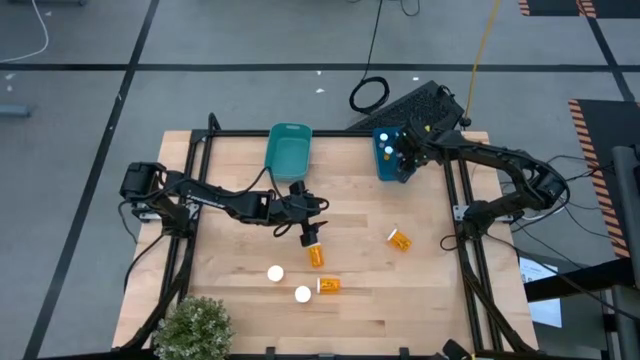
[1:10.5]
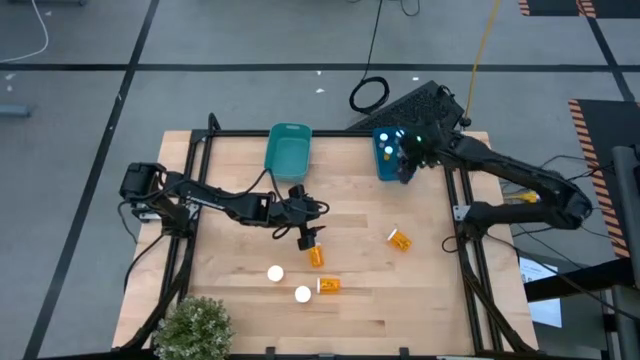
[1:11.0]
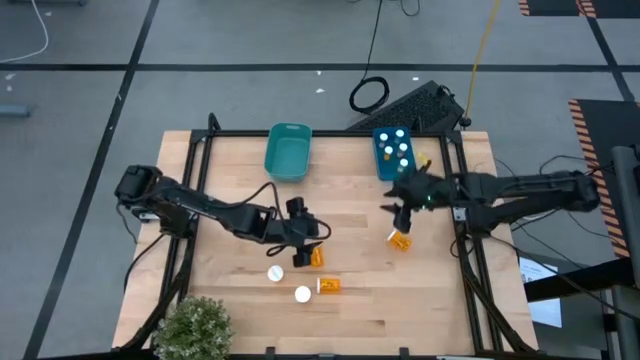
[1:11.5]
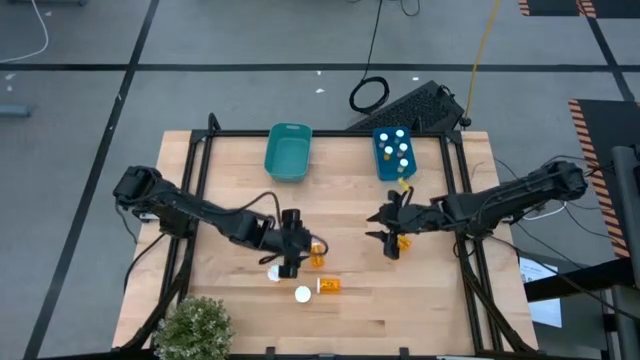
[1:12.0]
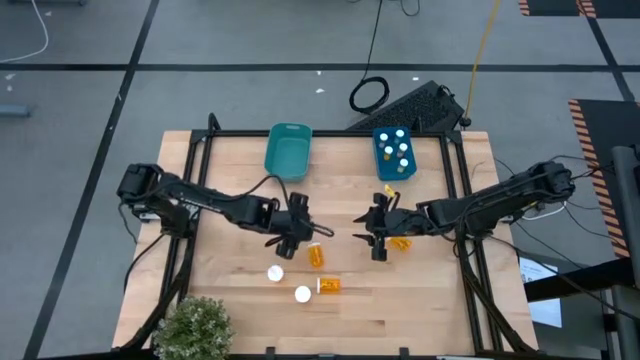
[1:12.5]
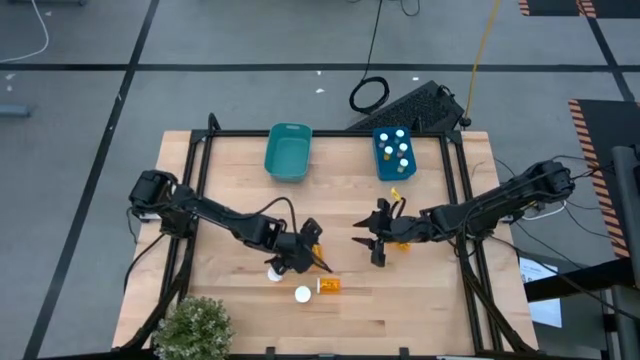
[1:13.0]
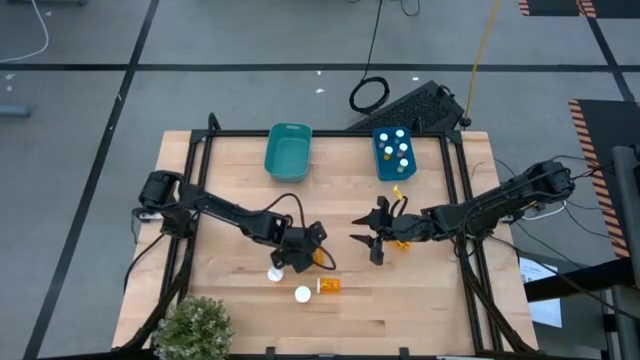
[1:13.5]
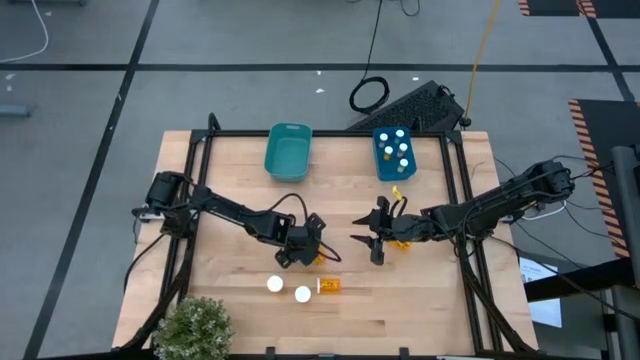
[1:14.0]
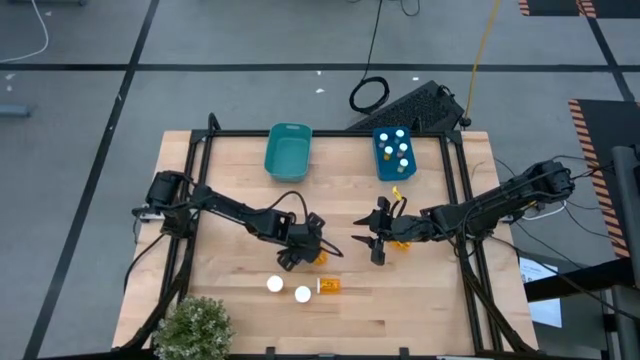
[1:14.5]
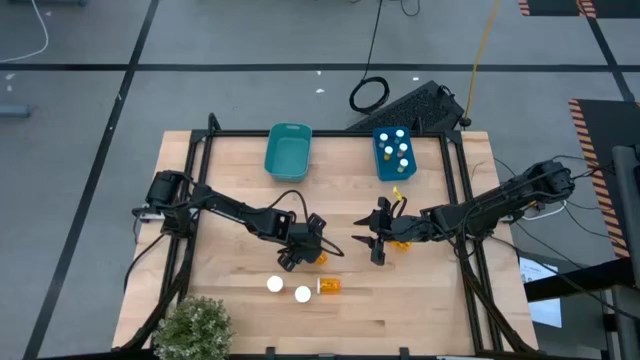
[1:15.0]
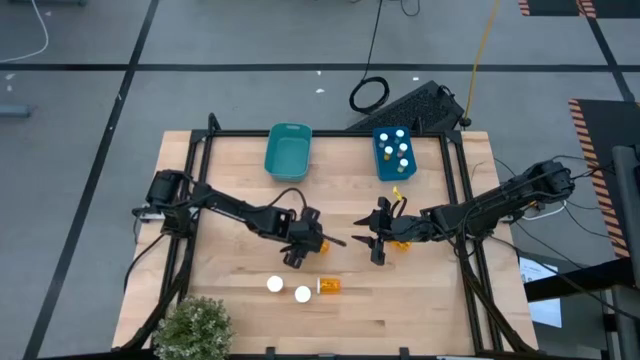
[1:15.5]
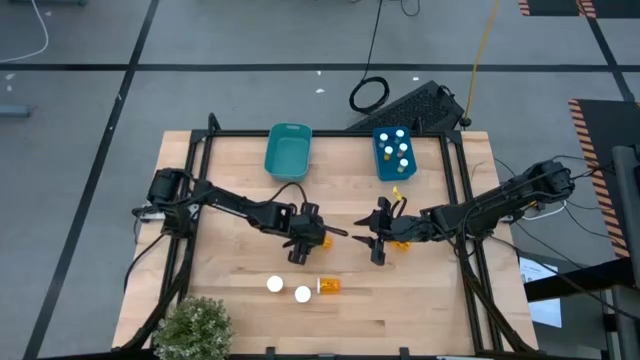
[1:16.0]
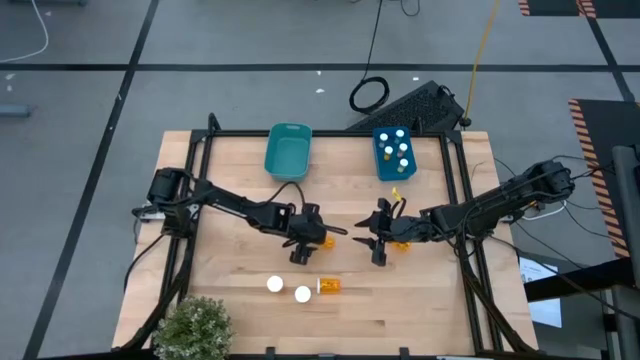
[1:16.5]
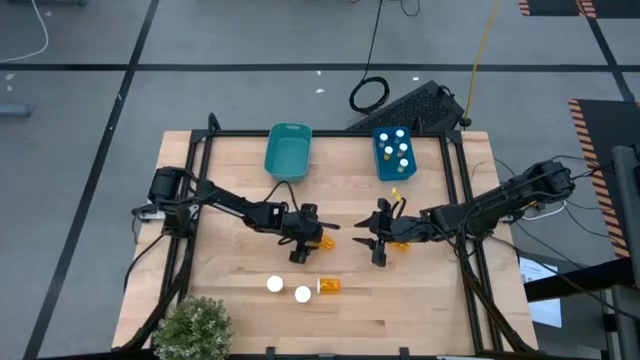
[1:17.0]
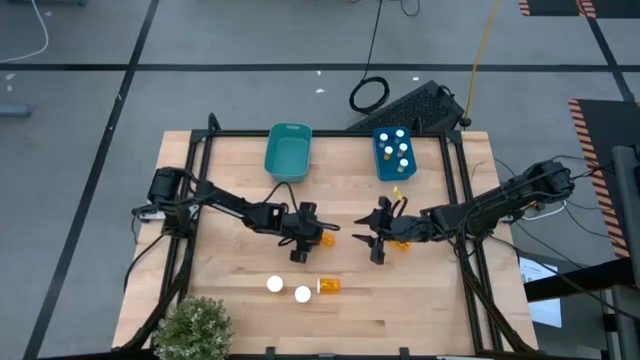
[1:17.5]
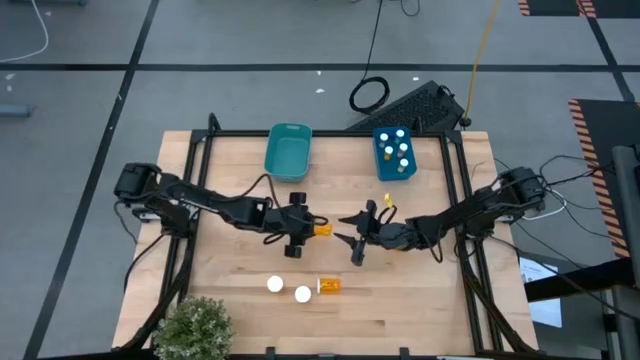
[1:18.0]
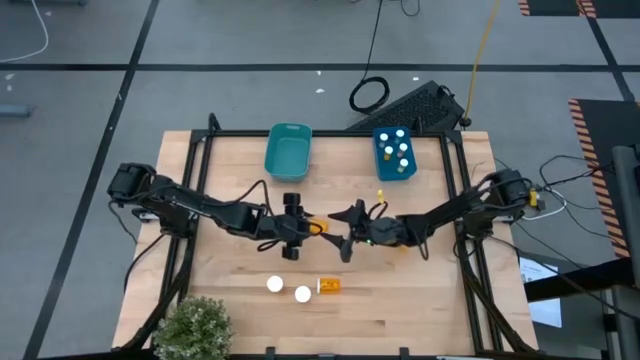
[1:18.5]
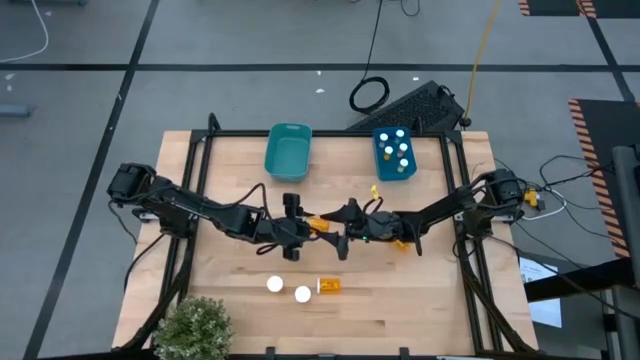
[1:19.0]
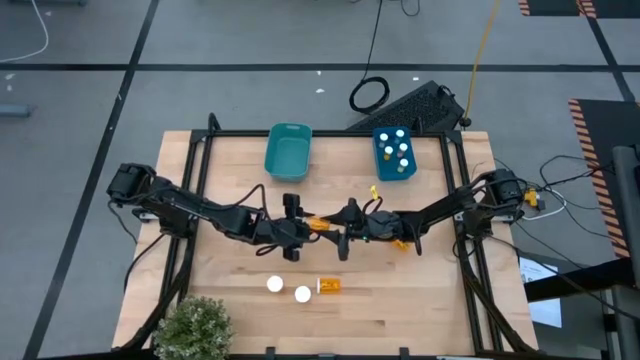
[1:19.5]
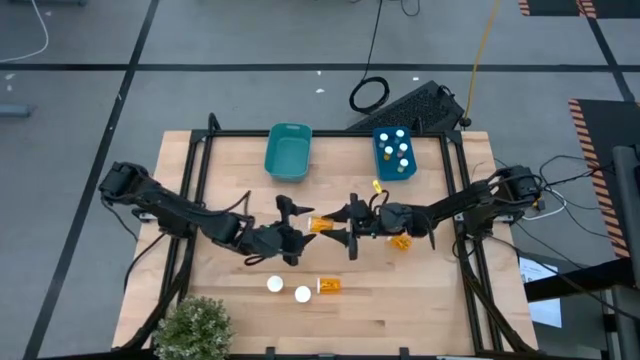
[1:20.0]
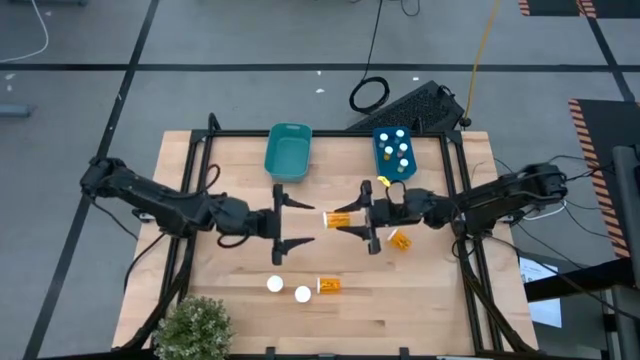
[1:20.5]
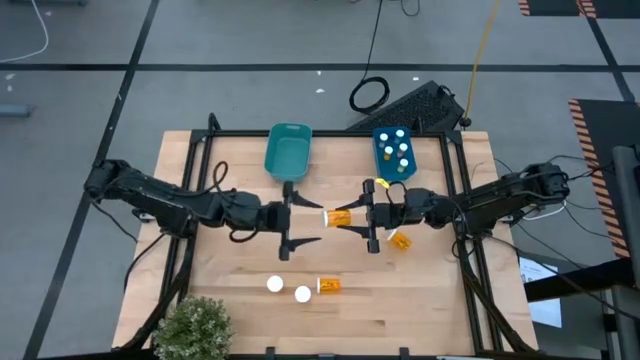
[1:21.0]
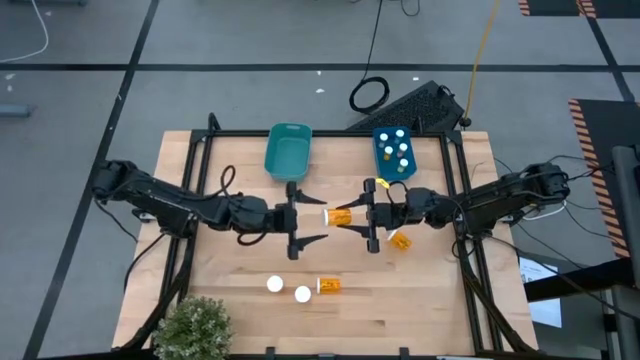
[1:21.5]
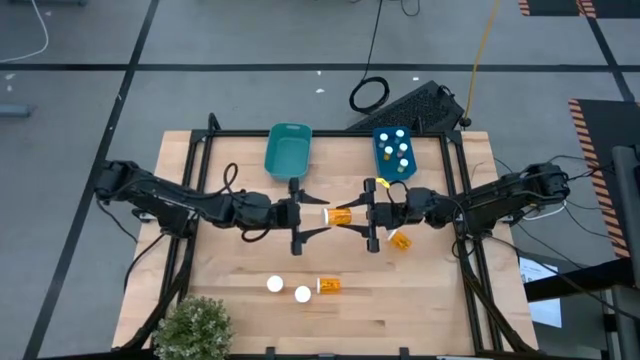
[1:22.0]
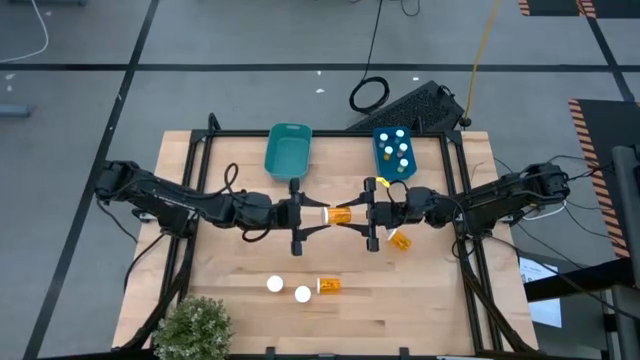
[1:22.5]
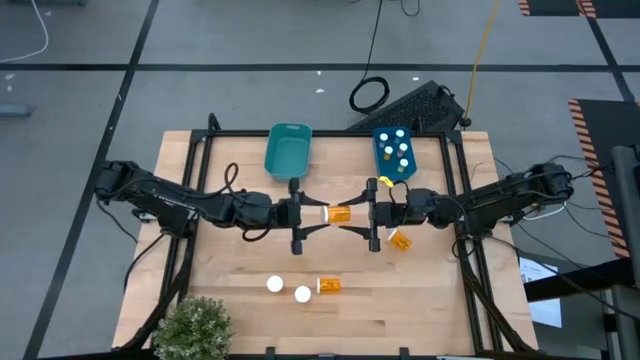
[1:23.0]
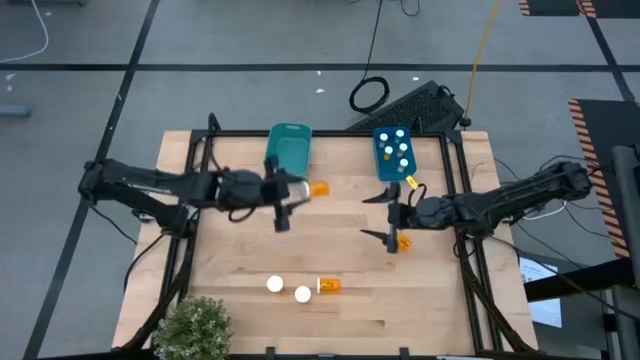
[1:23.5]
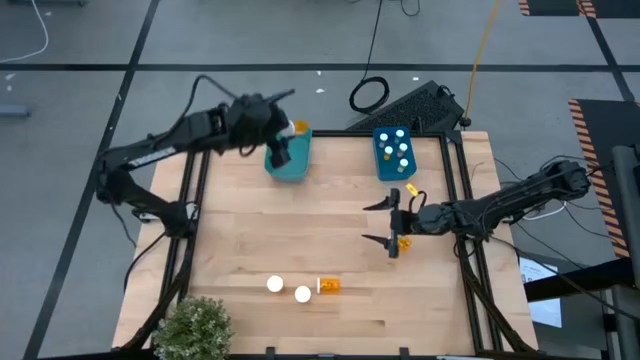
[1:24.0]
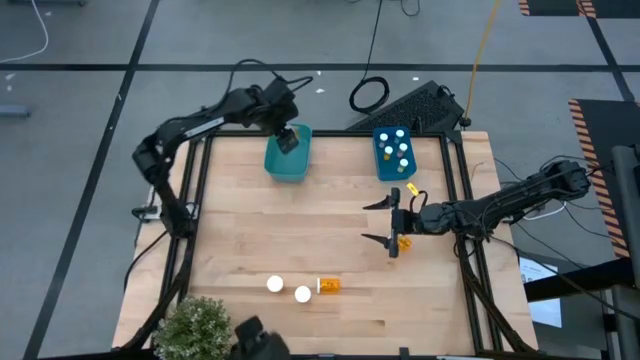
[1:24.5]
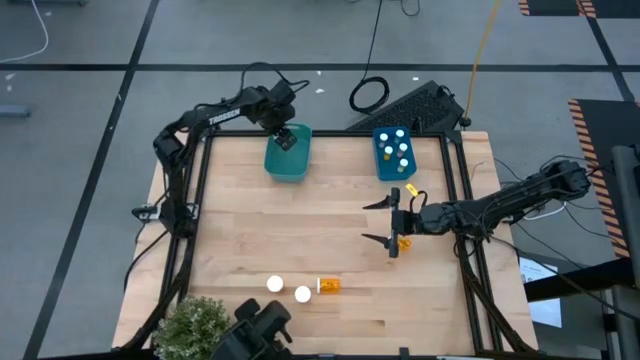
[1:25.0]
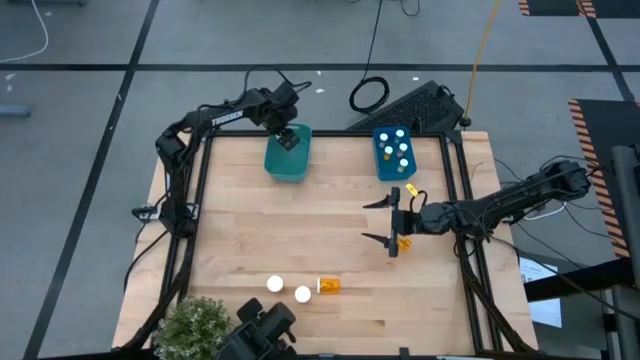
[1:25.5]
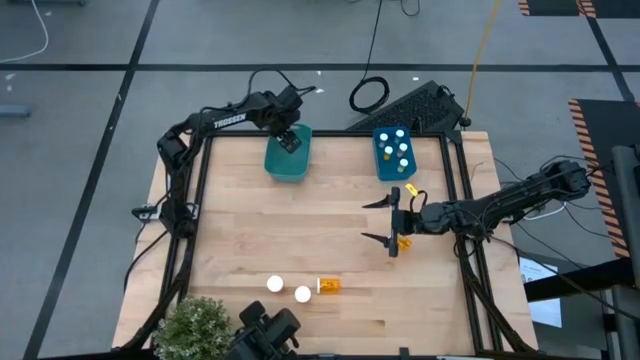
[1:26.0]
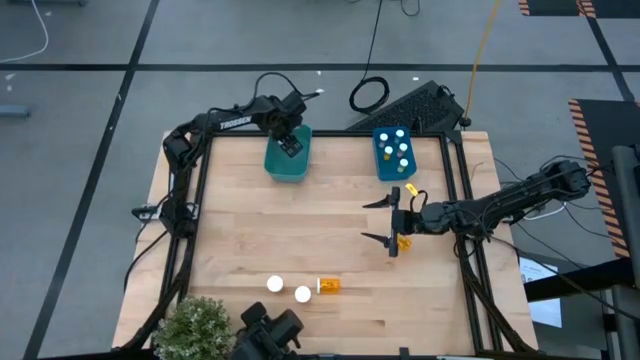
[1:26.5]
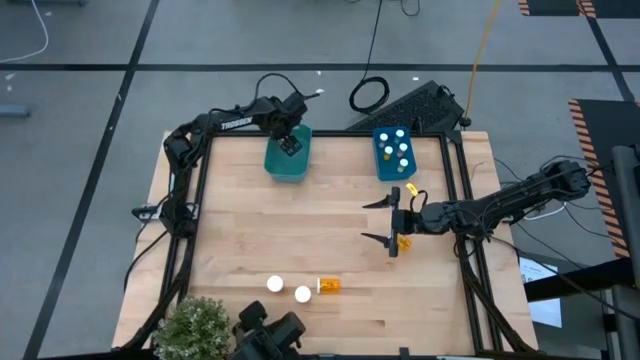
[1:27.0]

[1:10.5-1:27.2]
Task: Pick and place medicine bottles into bin by pill shape (circle, oval)
Put the big orange pill bottle into the green bin

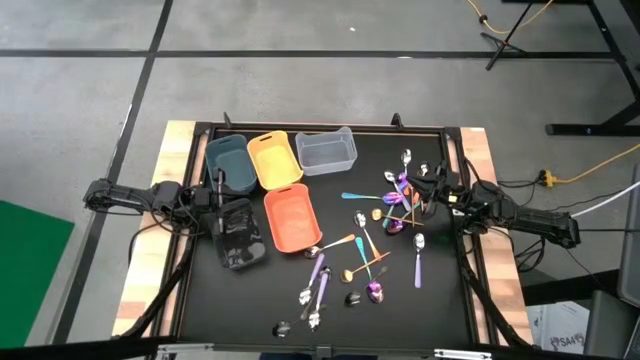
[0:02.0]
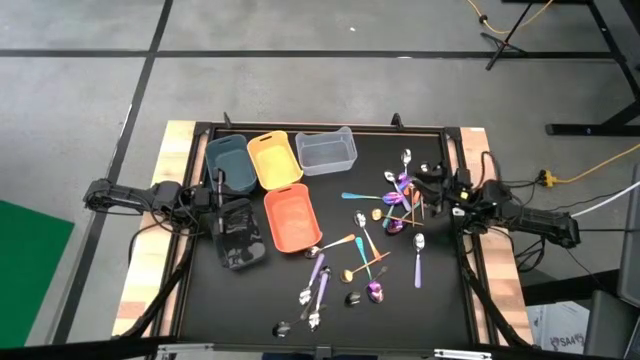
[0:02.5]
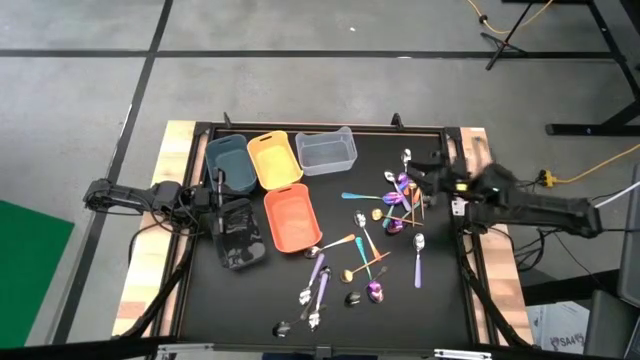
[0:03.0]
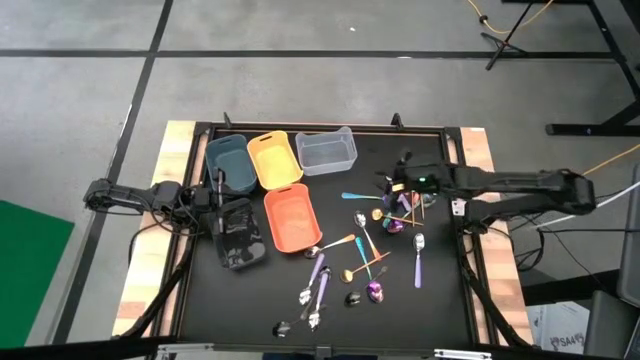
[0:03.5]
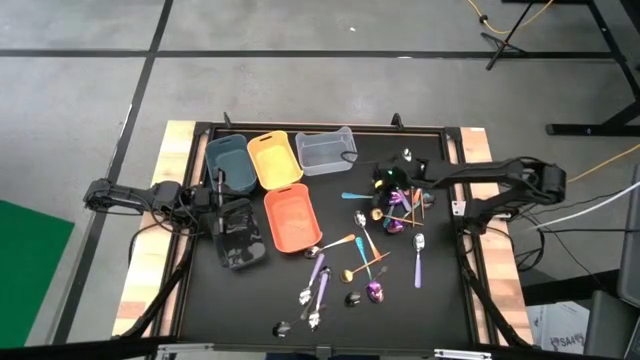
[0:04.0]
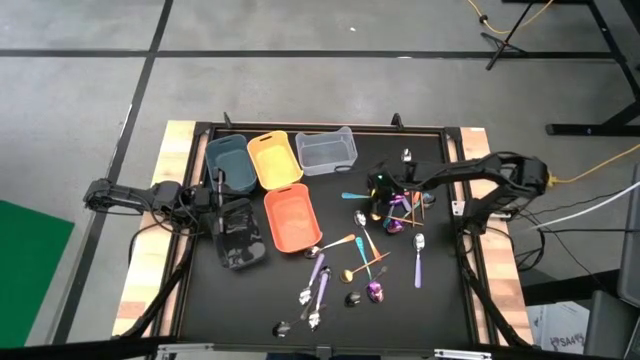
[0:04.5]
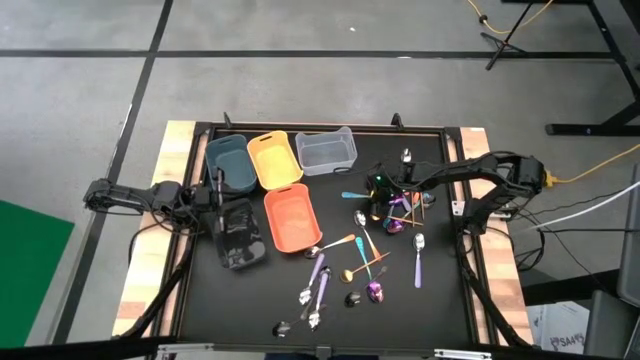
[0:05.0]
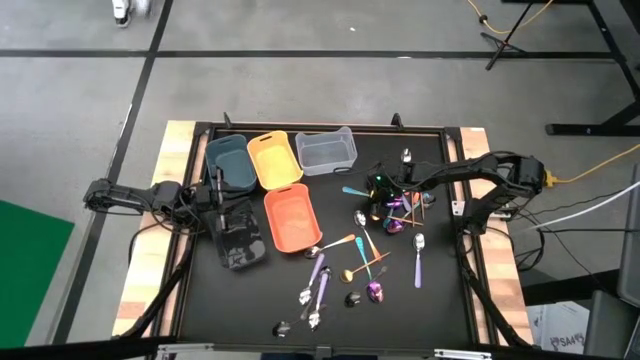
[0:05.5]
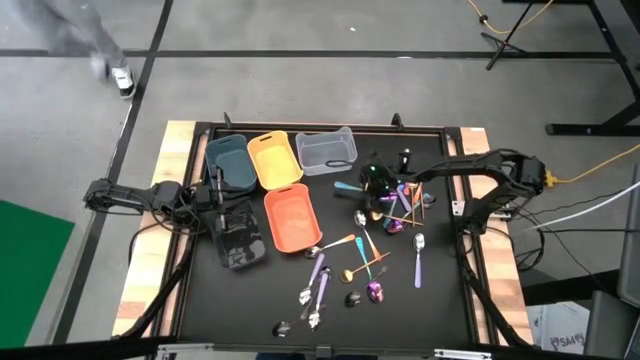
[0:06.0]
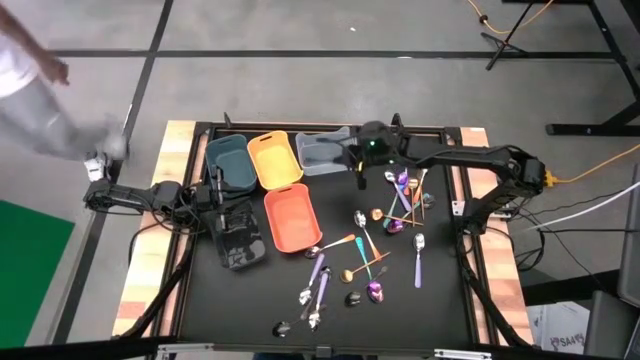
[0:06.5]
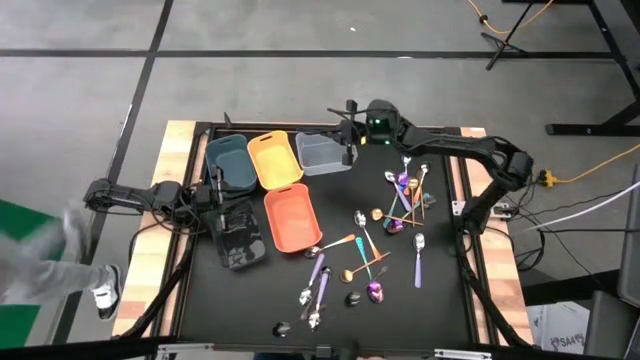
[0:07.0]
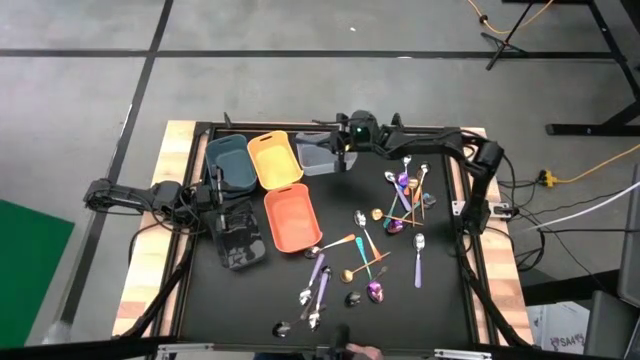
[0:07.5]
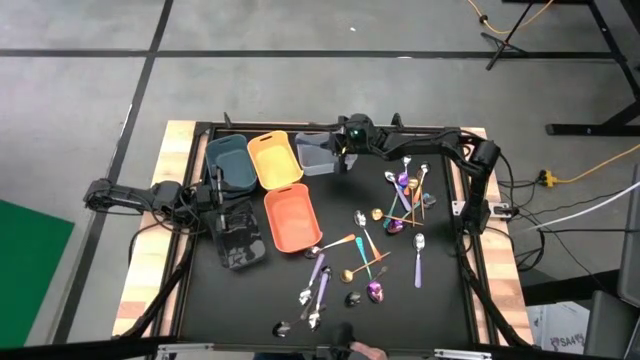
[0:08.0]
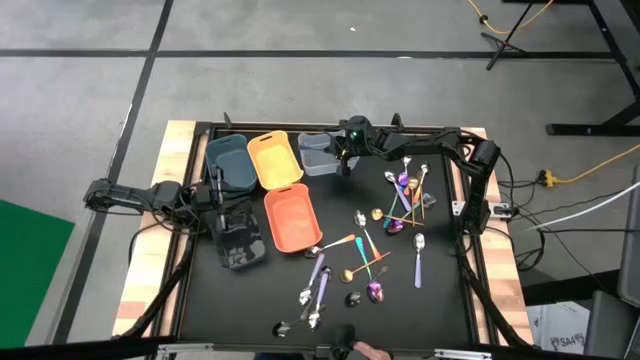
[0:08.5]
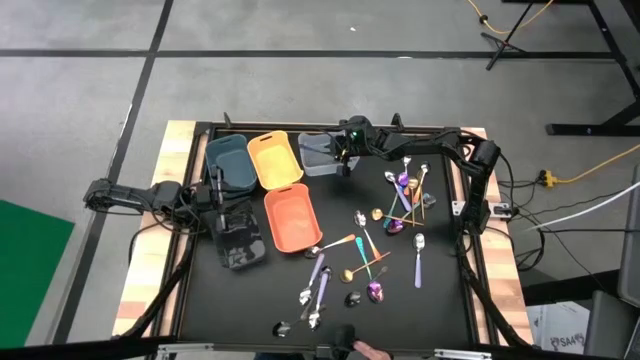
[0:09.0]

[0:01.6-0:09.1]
Task: Sort silverware by color (type)
Put the blue spoon into the transparent bin
